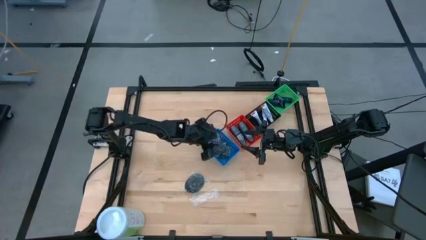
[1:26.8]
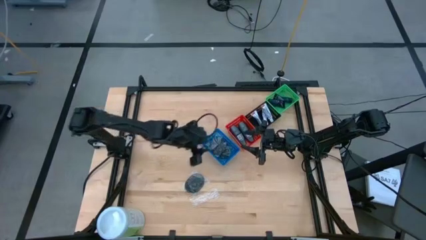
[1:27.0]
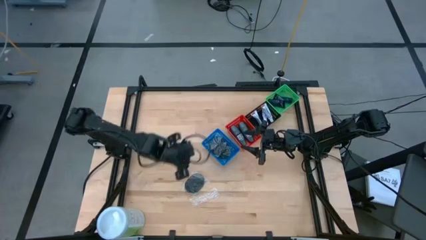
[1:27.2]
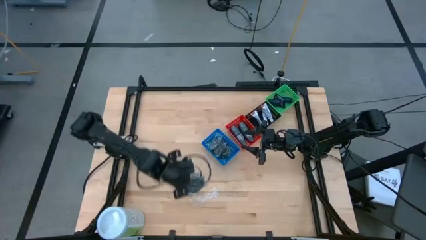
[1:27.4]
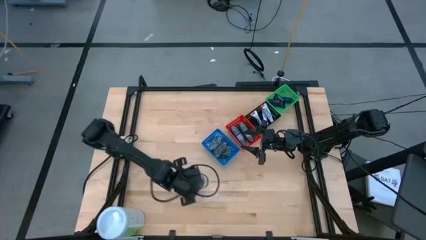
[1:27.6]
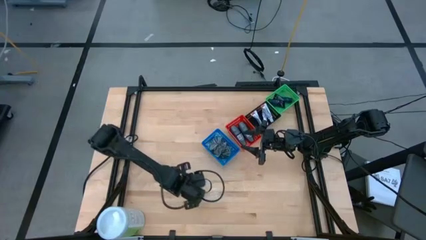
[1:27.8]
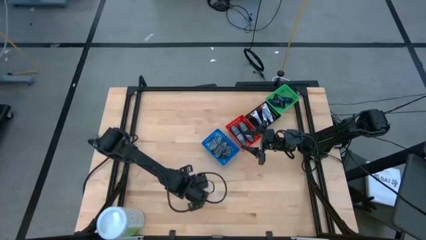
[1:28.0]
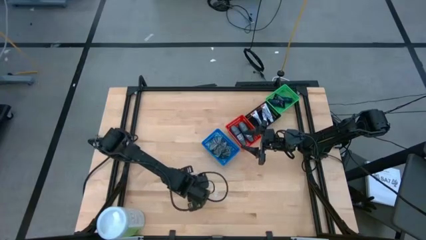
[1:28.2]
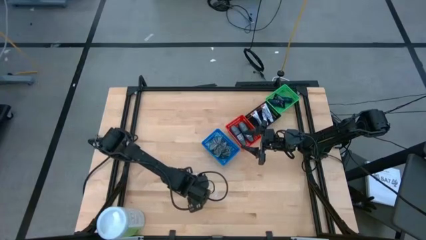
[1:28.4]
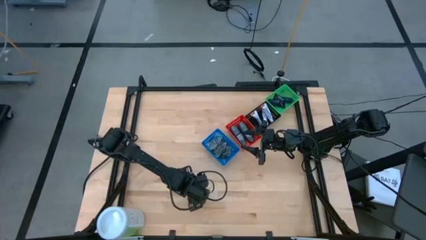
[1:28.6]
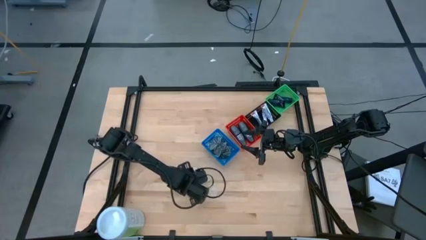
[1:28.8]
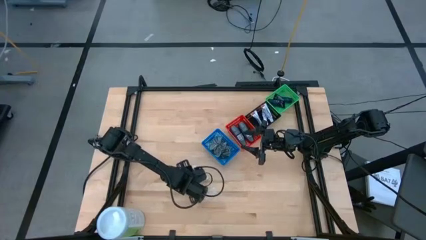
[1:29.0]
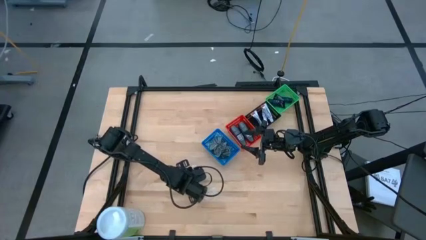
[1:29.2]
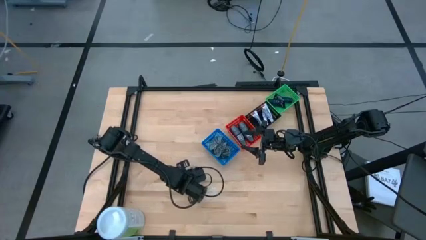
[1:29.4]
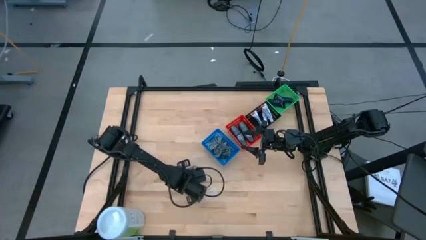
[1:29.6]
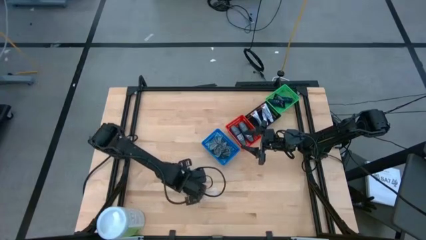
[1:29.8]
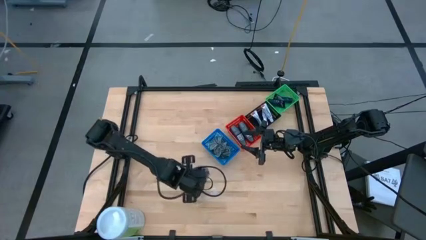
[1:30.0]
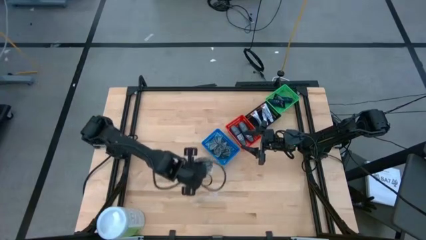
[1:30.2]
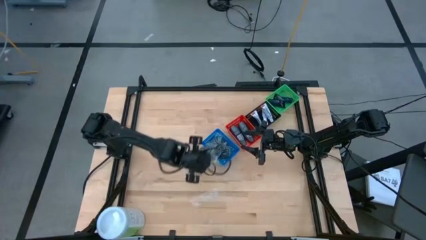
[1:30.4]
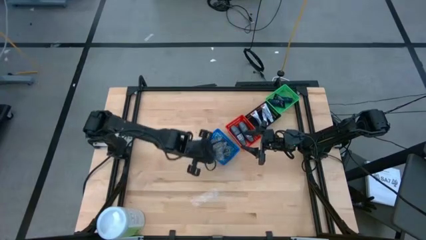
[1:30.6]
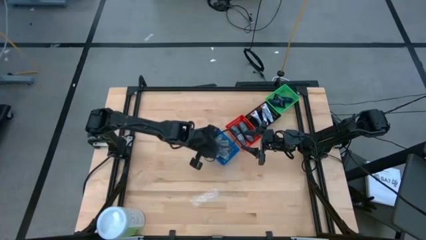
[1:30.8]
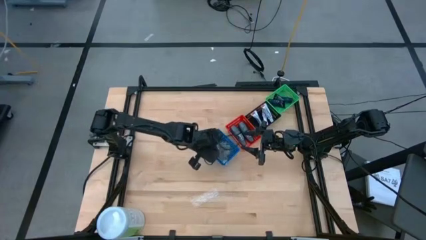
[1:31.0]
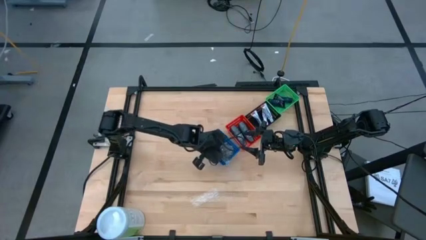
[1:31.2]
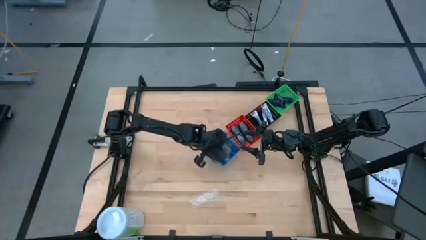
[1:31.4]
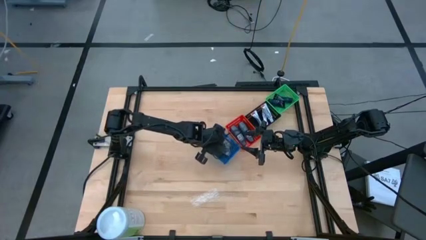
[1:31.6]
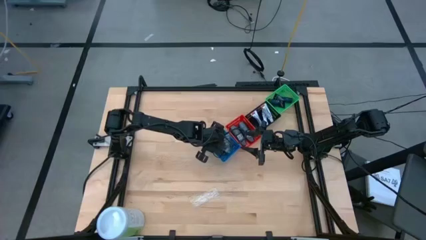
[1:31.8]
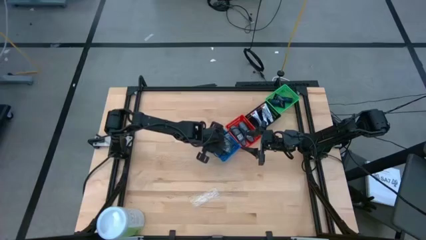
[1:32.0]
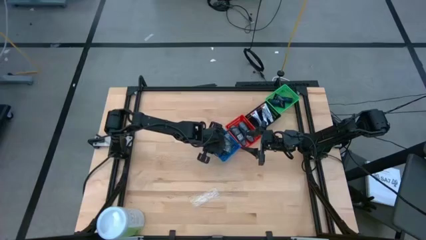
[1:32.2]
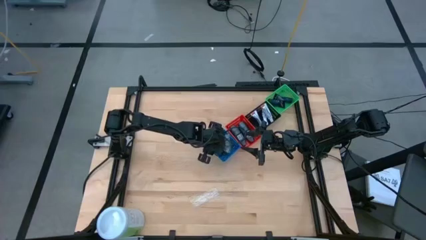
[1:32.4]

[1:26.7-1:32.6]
Task: Pick & Place Travel size toiletries
Put the hairbrush into the blue bin

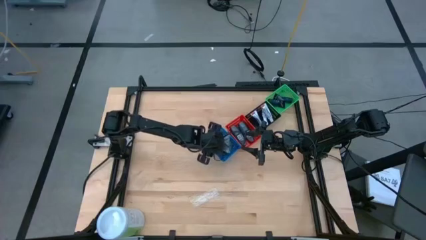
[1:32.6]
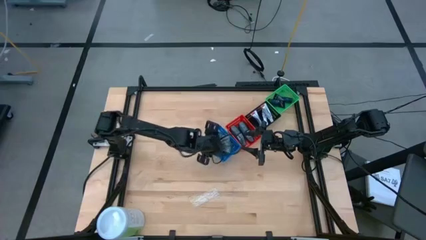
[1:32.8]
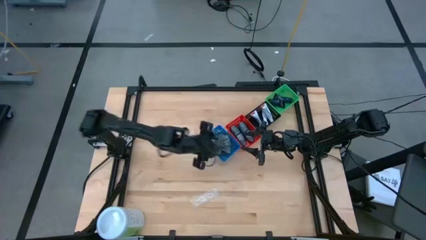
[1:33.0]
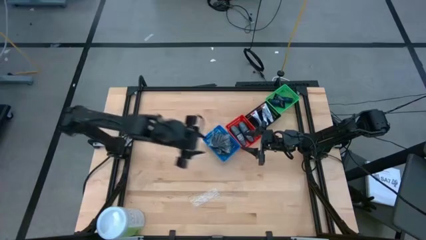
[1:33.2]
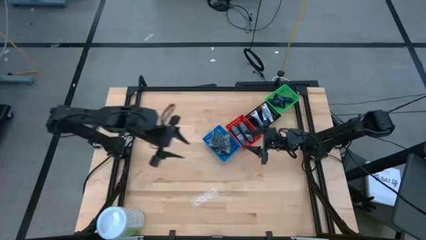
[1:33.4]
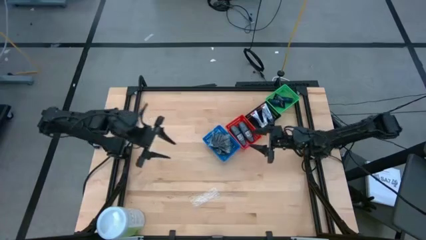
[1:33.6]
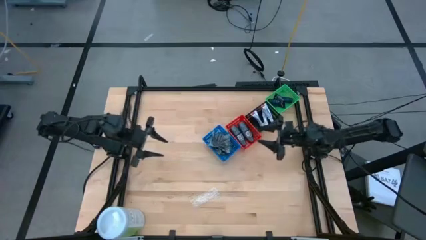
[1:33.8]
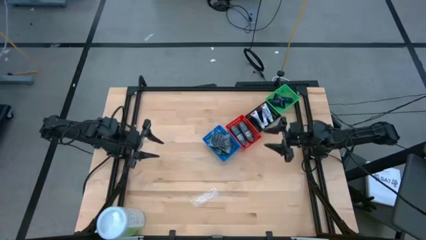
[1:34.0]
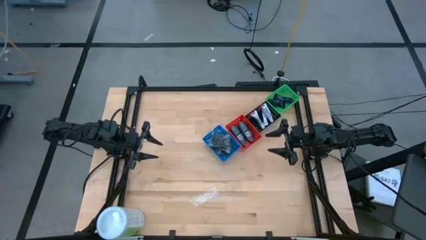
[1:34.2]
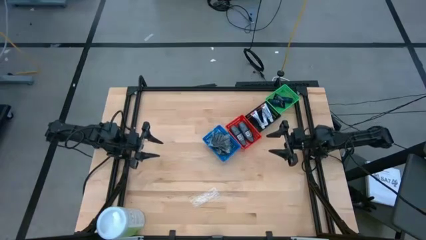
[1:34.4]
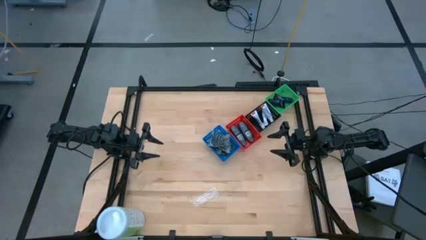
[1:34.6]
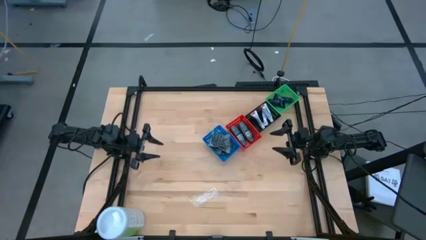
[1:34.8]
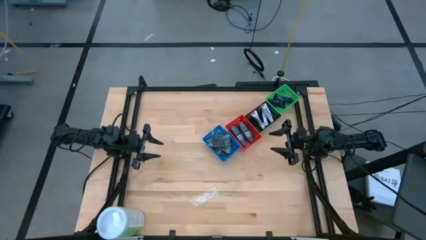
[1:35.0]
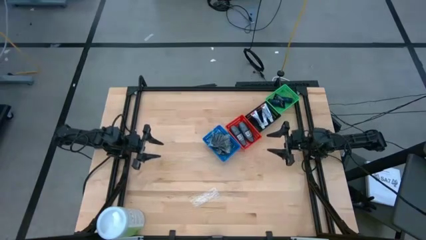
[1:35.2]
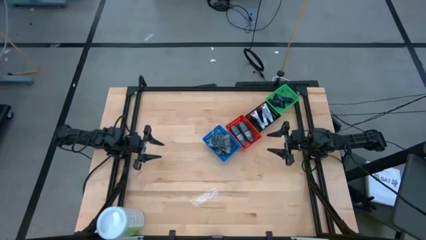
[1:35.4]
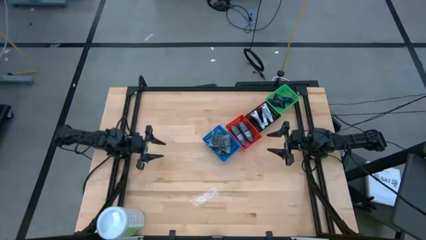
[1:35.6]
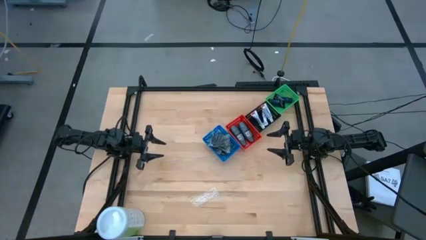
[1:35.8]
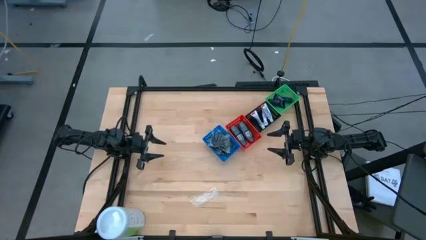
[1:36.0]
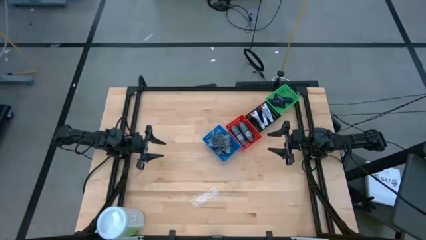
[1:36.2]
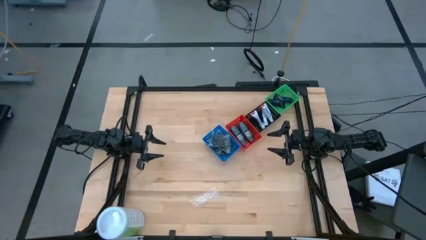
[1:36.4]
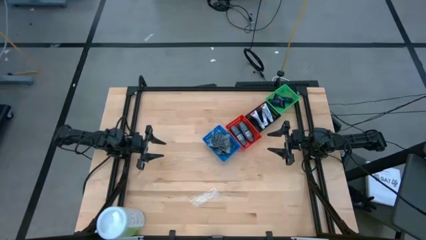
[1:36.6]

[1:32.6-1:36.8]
Return to Home Position

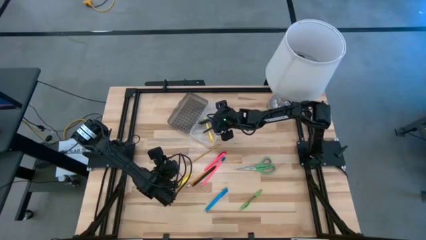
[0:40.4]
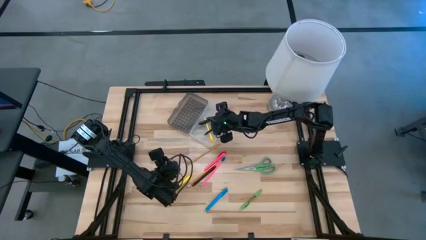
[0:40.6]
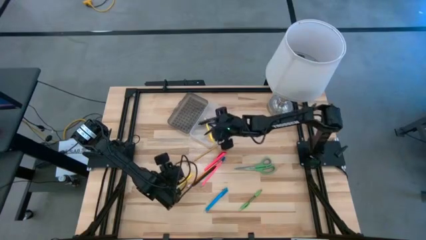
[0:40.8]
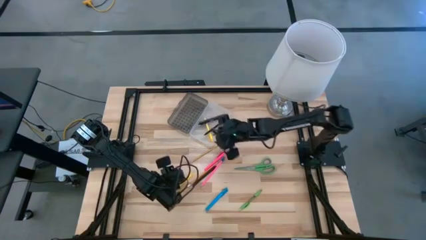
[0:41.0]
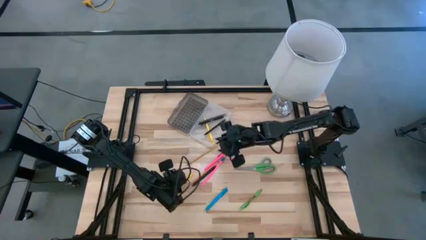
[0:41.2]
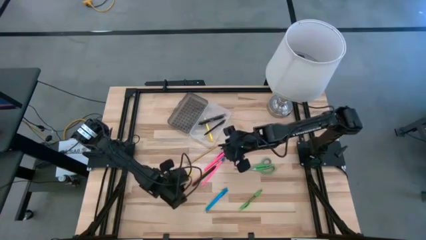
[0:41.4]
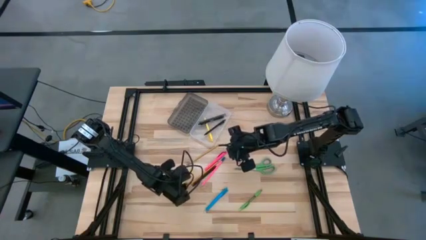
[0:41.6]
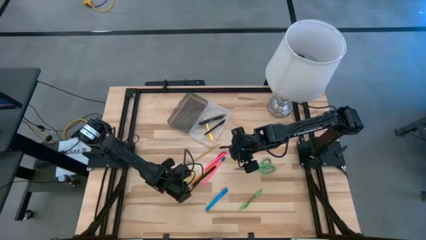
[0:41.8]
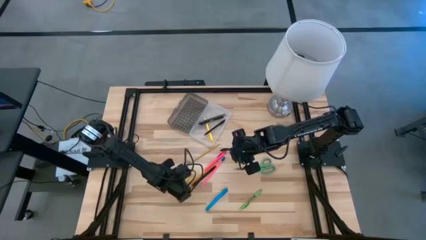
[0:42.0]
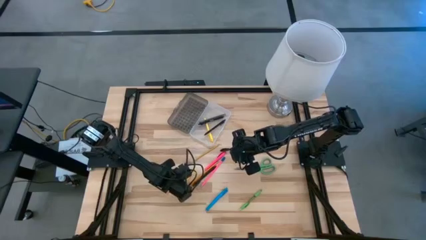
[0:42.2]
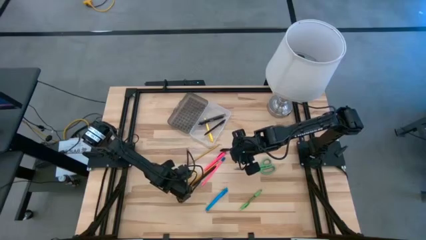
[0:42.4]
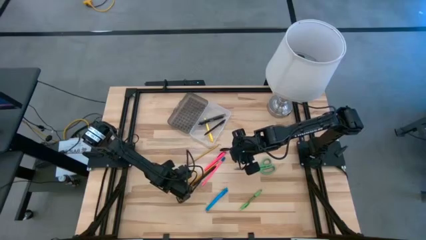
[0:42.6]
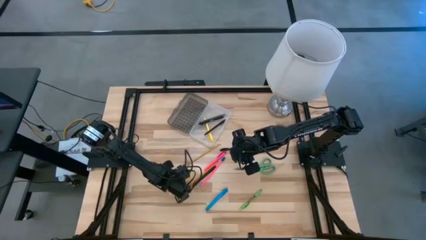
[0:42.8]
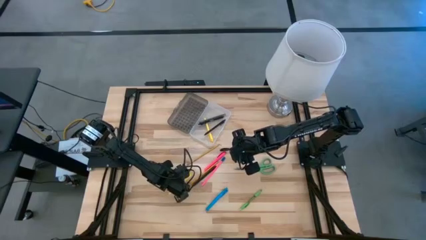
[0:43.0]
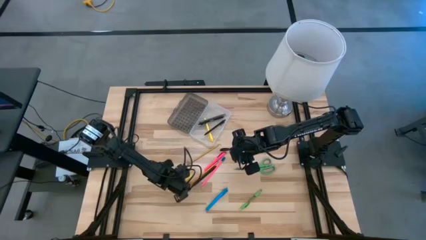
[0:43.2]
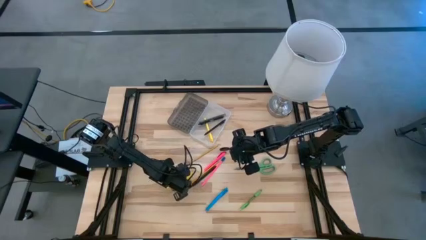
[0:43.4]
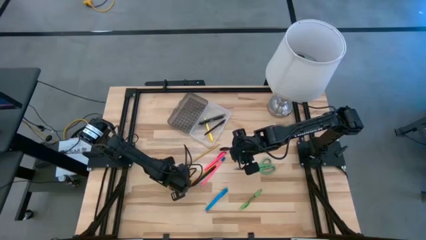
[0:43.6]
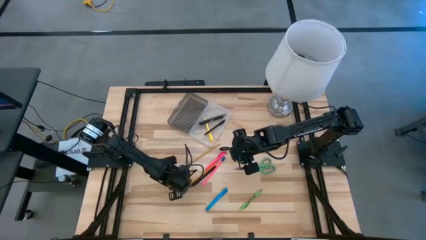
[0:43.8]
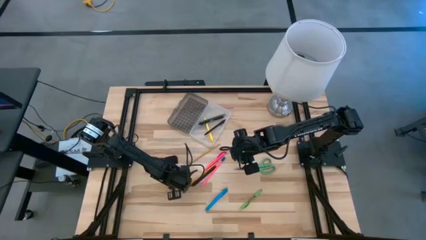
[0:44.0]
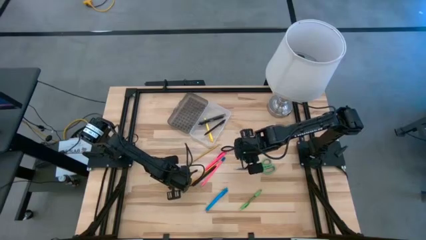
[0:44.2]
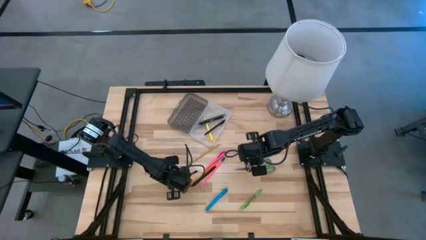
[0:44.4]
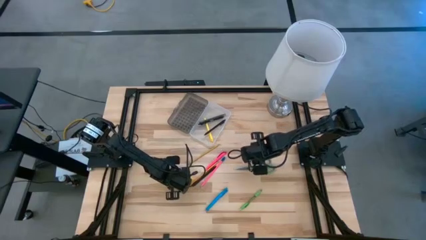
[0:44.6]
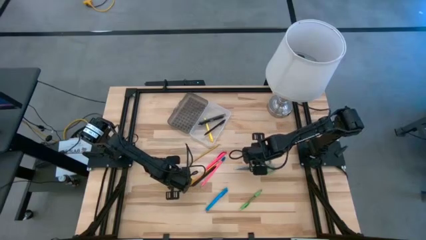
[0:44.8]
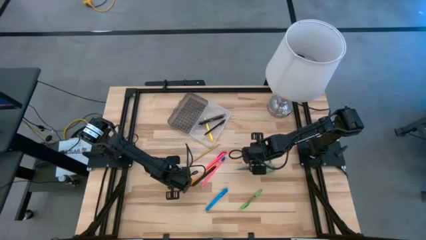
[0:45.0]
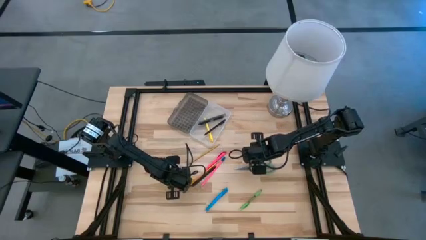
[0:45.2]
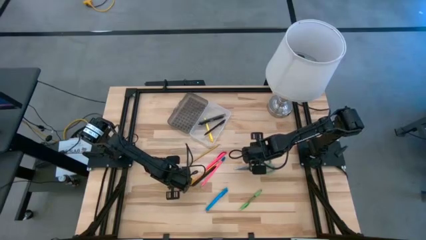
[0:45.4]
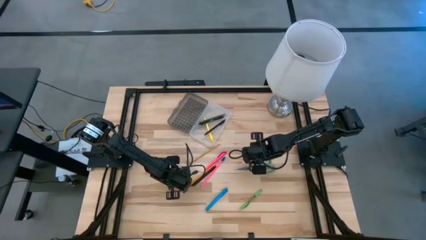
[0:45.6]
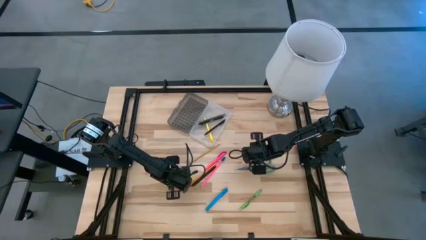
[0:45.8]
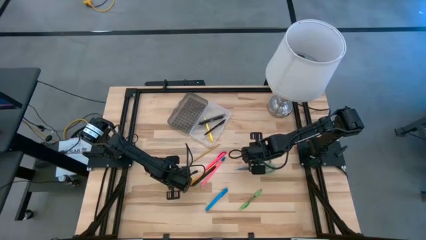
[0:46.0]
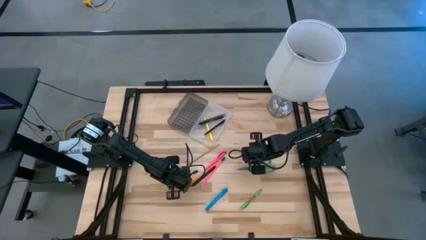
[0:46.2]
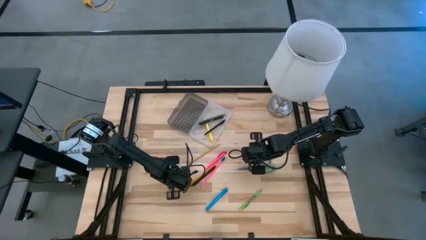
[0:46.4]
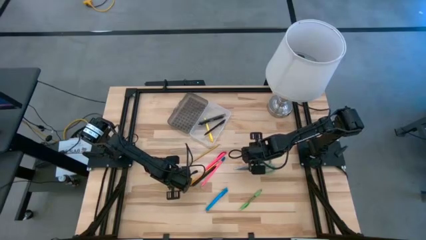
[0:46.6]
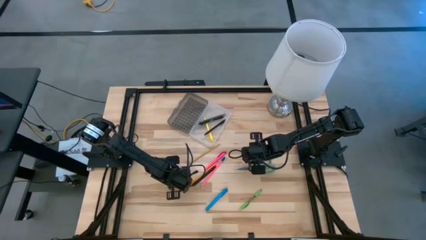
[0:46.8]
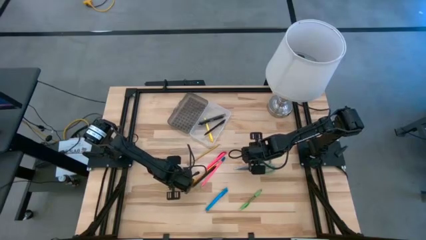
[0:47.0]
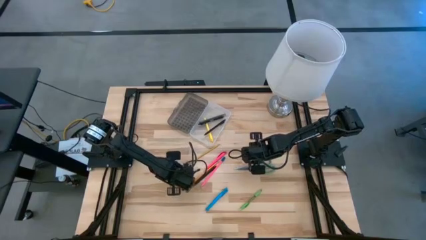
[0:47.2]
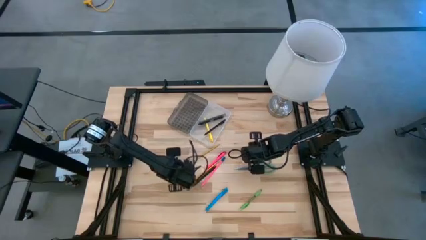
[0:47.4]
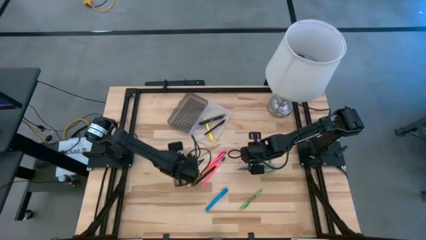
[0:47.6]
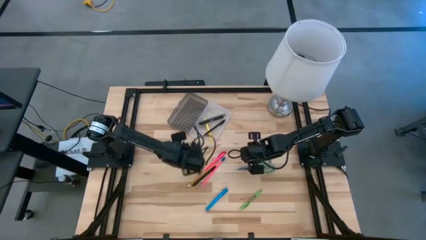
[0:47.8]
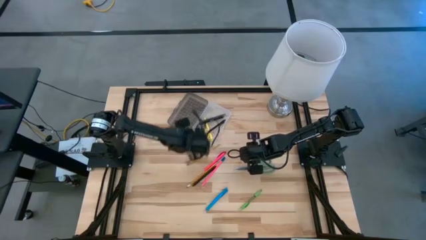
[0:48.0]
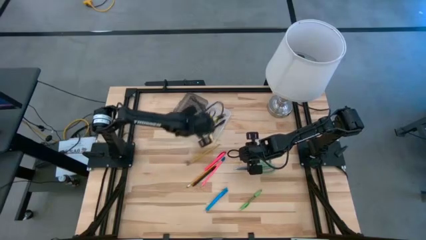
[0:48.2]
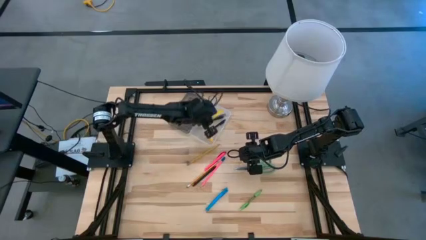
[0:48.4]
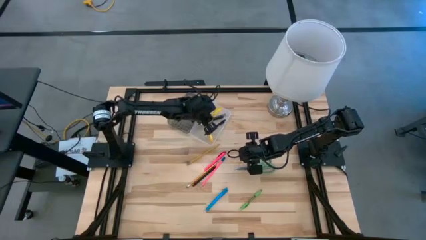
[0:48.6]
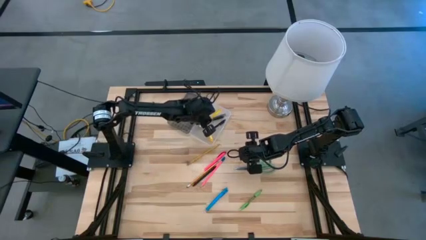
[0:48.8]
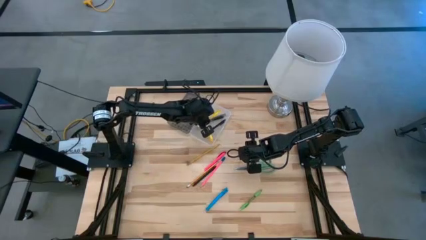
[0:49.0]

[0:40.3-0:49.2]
Task: Pick & place school supplies into a supply box
Put the yellow pen into the supply box
